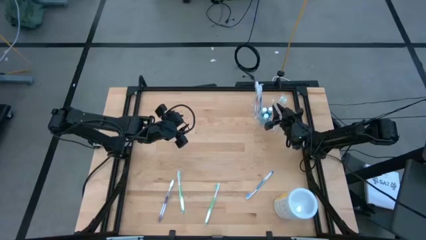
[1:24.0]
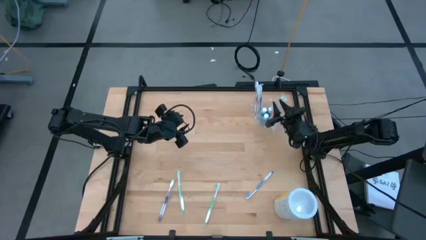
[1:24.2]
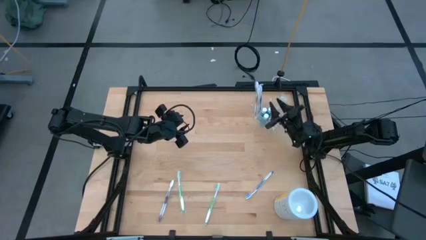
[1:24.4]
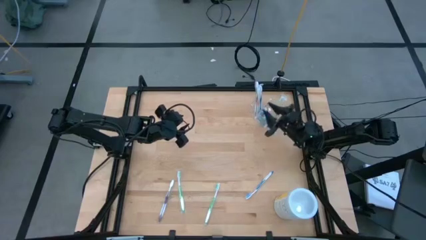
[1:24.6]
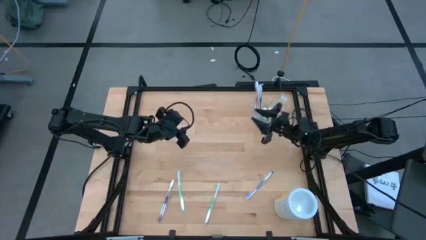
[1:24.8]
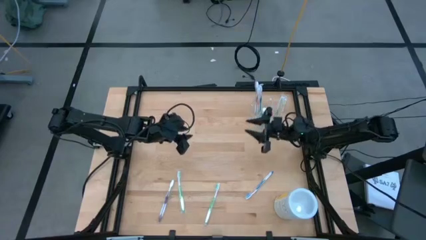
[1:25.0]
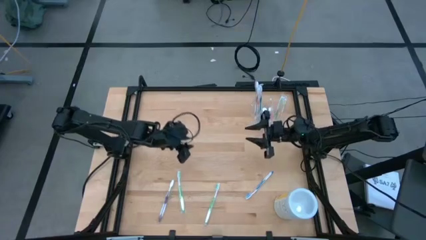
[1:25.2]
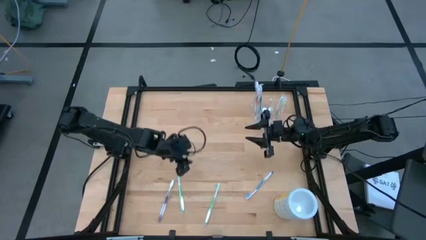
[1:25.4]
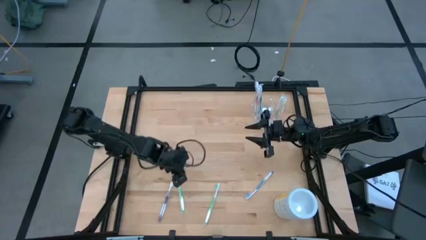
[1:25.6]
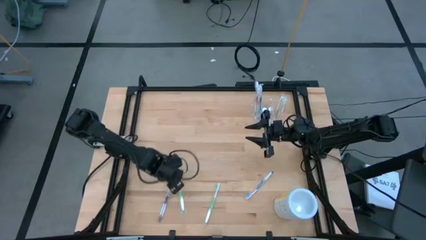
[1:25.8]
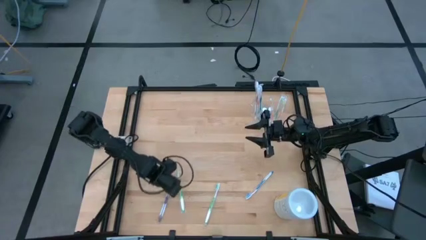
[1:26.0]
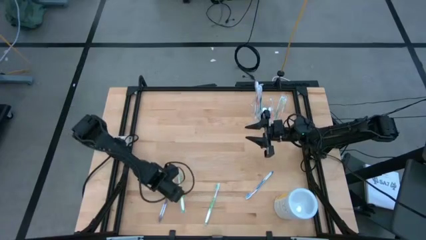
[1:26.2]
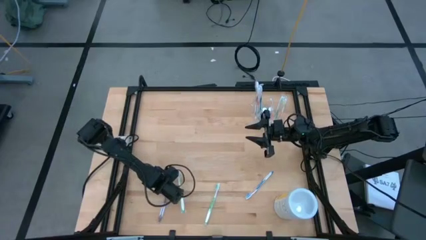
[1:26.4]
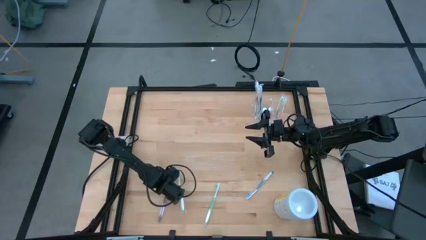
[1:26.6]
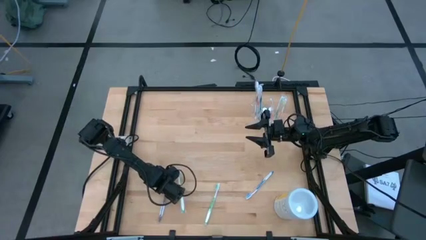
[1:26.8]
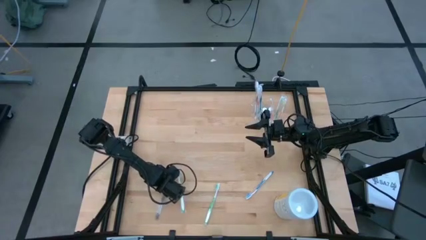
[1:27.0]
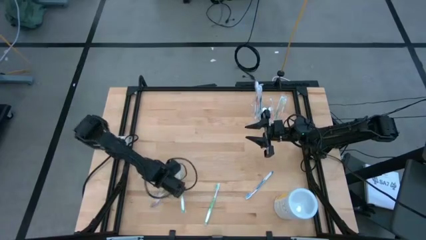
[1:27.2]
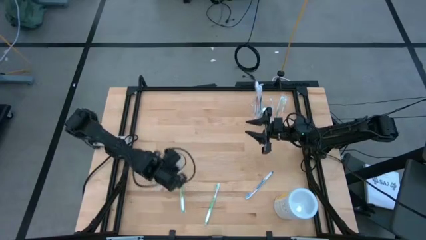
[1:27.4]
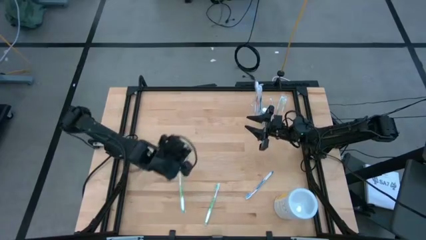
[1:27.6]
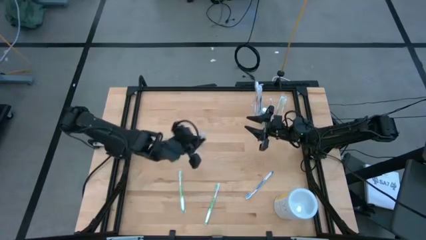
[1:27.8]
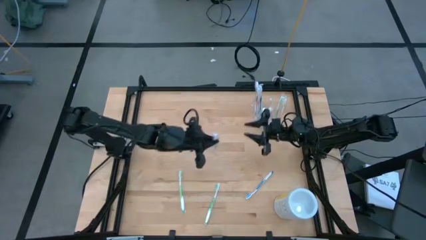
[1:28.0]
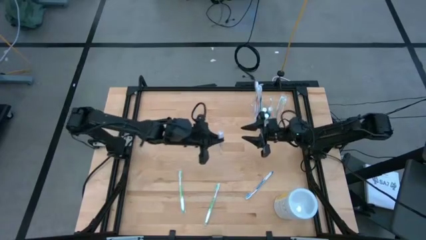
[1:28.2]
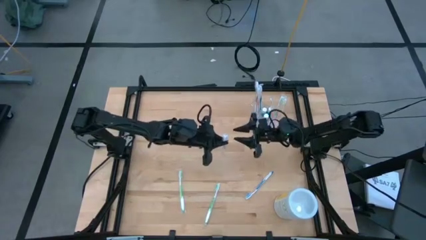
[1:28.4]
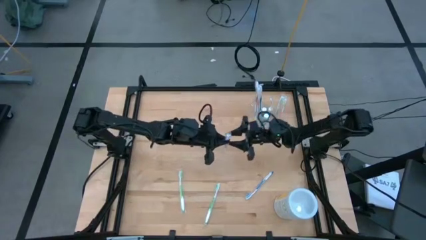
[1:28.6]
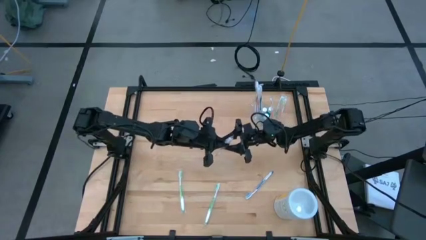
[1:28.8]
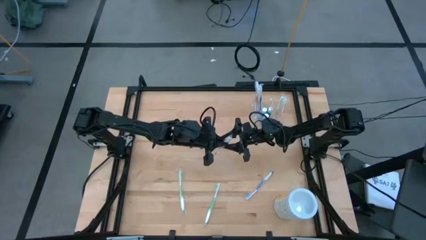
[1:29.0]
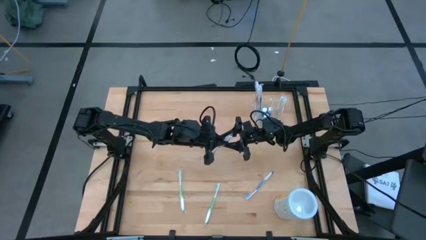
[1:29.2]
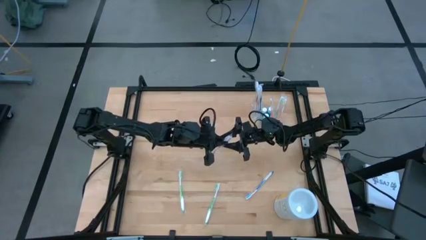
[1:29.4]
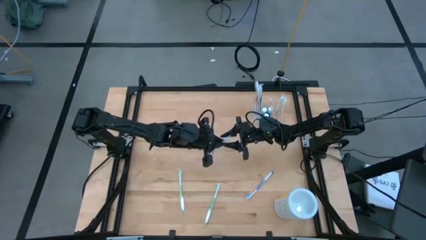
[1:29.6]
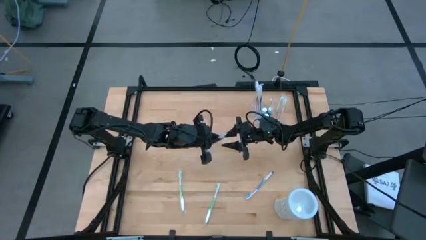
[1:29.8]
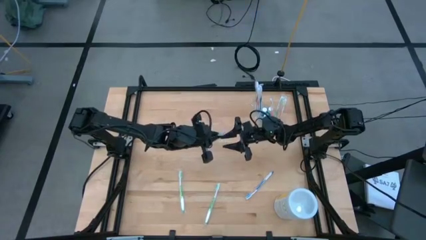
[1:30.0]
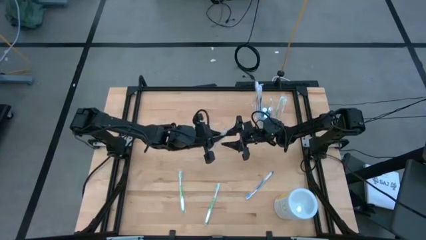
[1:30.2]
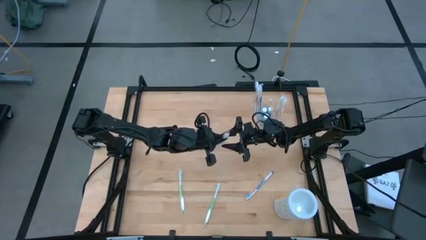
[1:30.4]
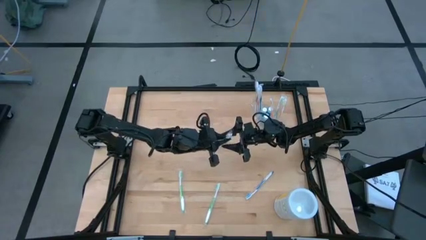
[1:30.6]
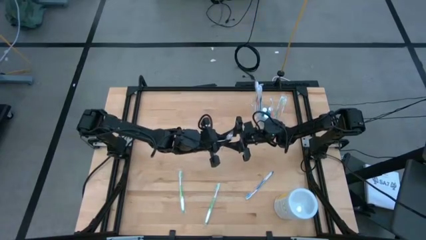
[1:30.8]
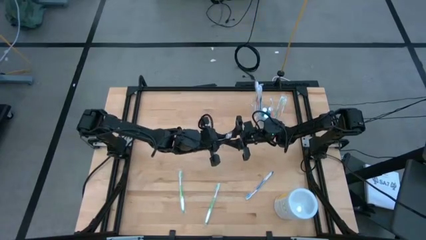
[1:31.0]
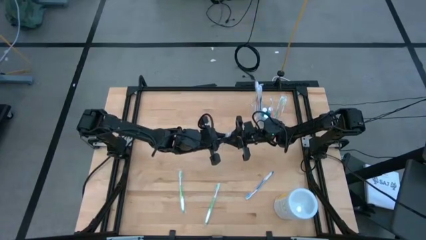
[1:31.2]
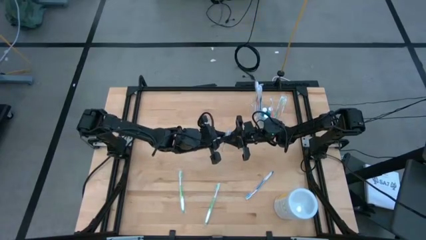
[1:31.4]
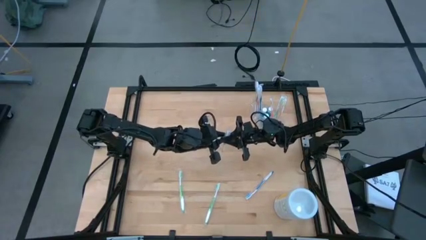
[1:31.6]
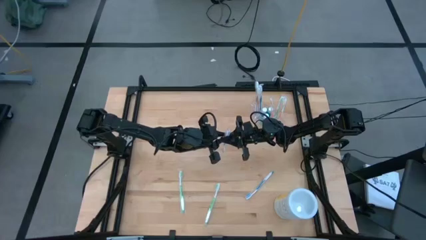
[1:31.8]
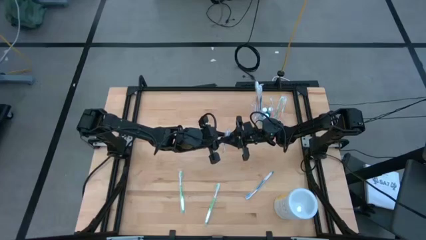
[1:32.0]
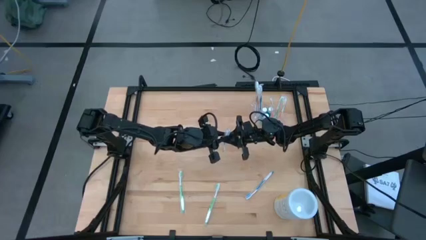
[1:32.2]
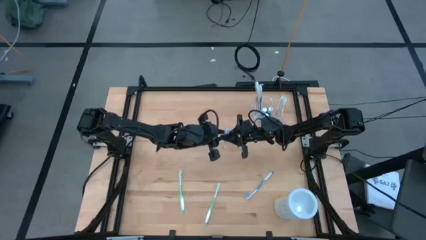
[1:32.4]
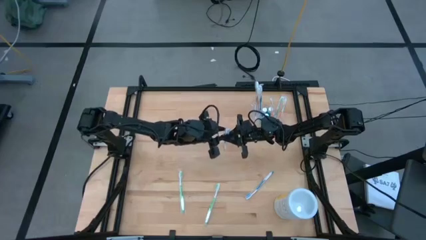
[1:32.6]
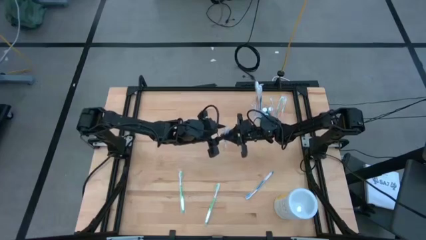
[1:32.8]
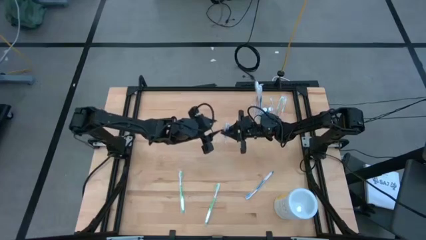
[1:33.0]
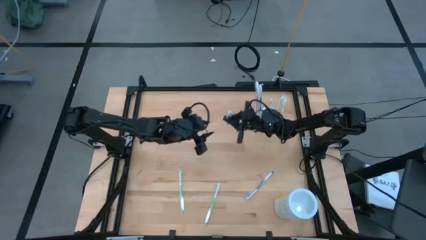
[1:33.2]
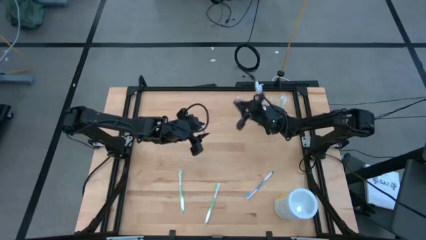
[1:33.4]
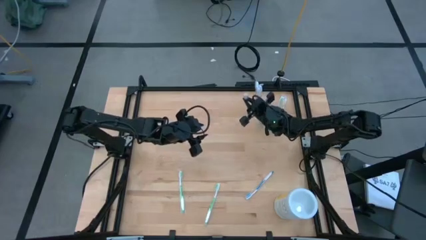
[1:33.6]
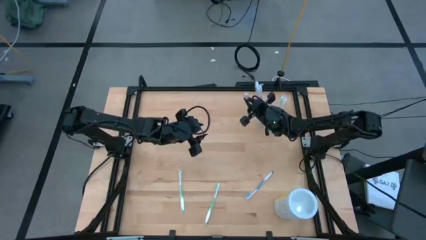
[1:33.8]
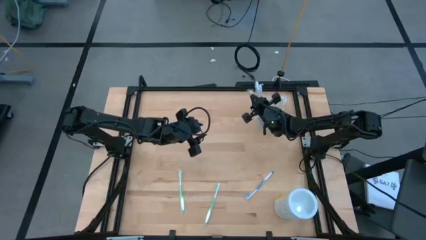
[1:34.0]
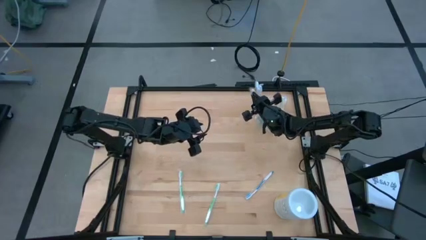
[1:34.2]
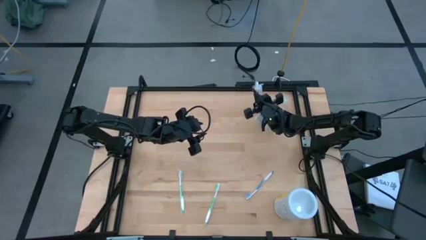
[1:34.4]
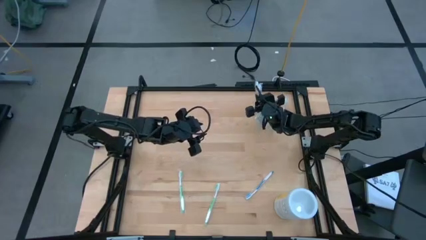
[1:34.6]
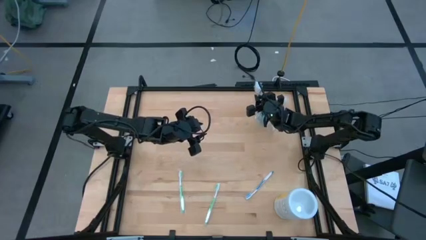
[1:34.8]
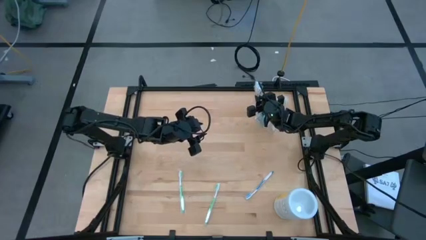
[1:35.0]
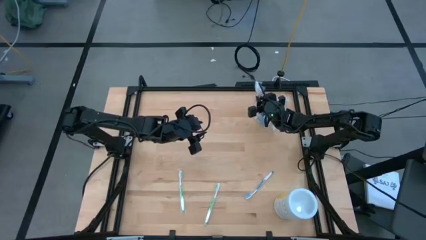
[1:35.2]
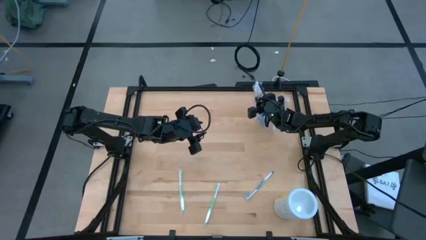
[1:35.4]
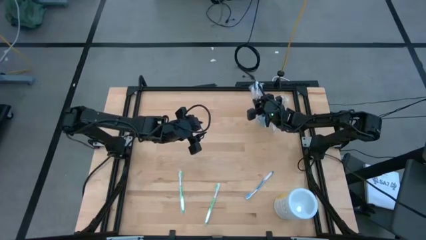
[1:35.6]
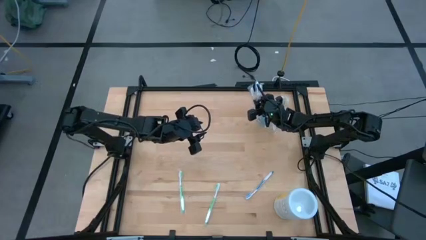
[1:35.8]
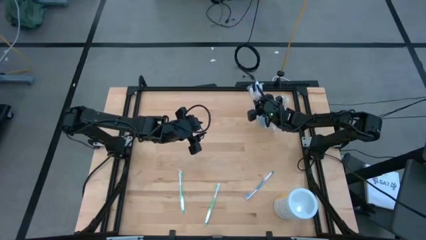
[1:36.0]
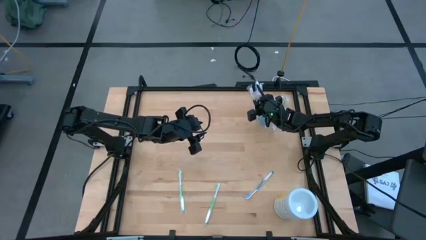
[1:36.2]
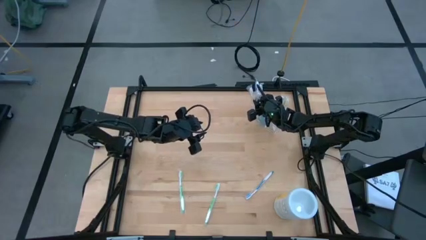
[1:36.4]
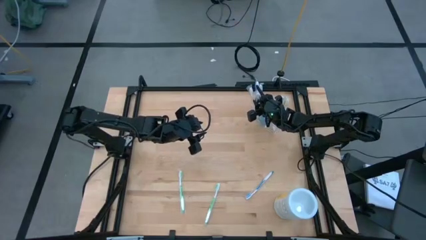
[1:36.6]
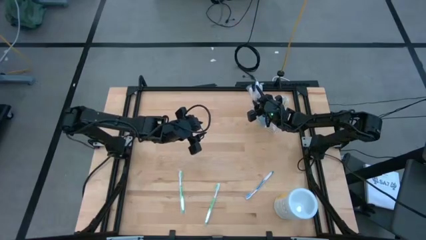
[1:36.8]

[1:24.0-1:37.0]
Task: Pick & Place toothbrushing station
Put the purple toothbrush into the transparent organizer
